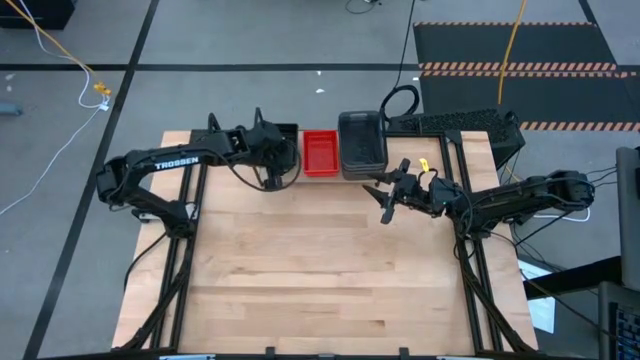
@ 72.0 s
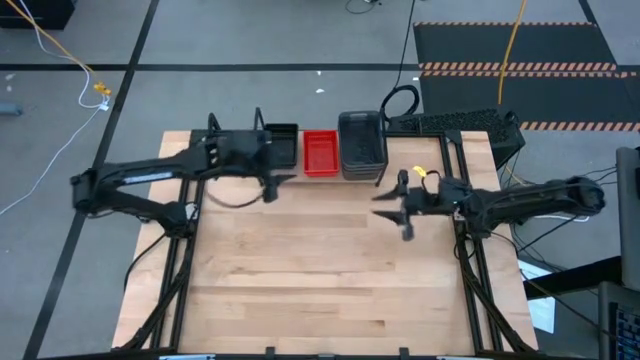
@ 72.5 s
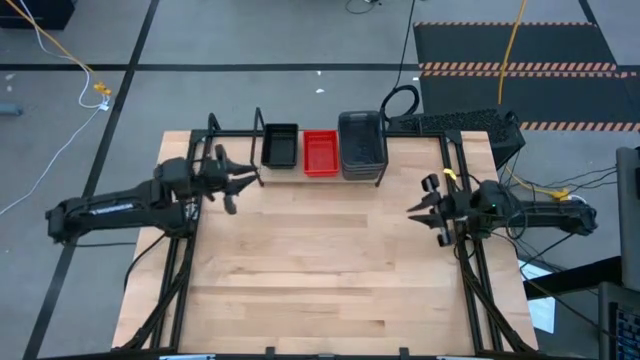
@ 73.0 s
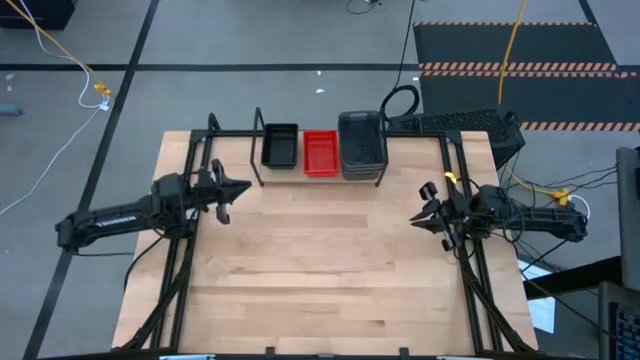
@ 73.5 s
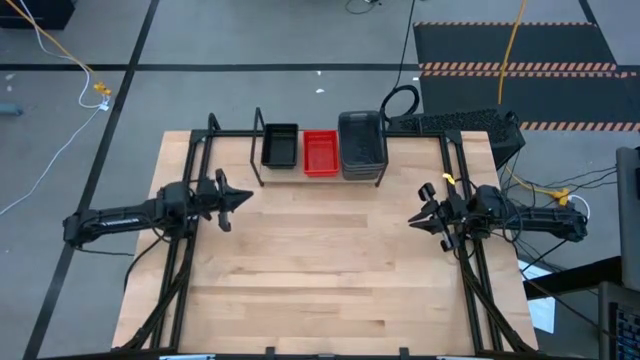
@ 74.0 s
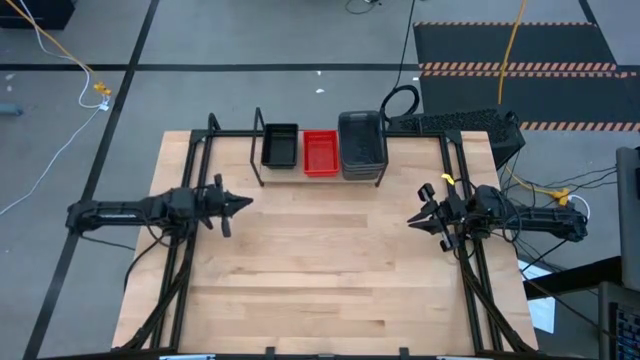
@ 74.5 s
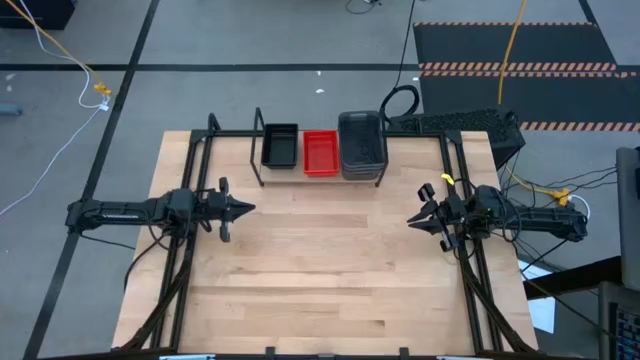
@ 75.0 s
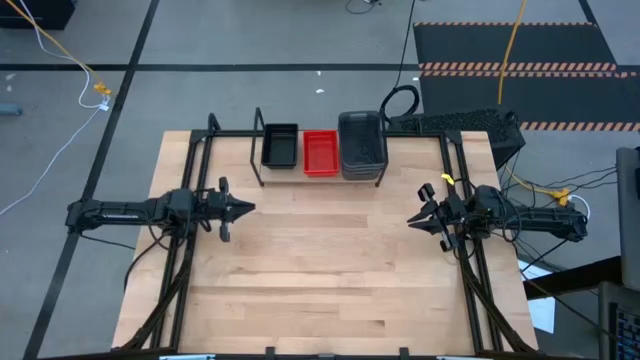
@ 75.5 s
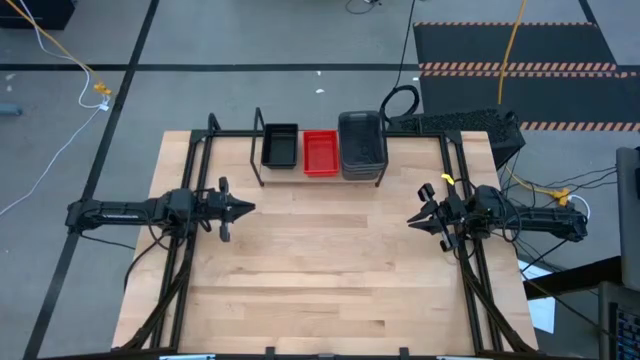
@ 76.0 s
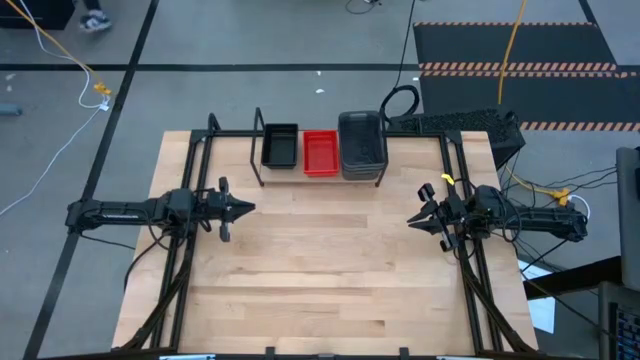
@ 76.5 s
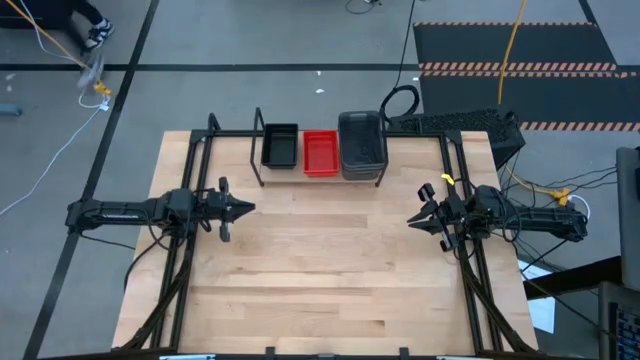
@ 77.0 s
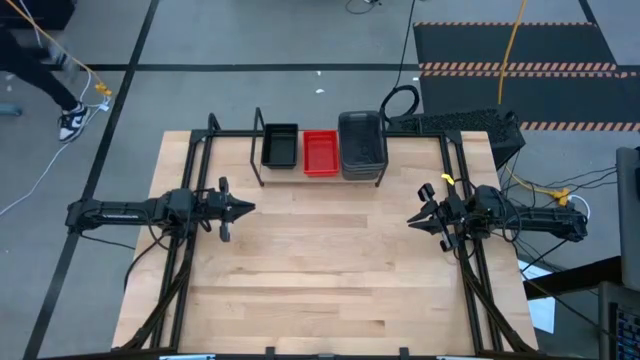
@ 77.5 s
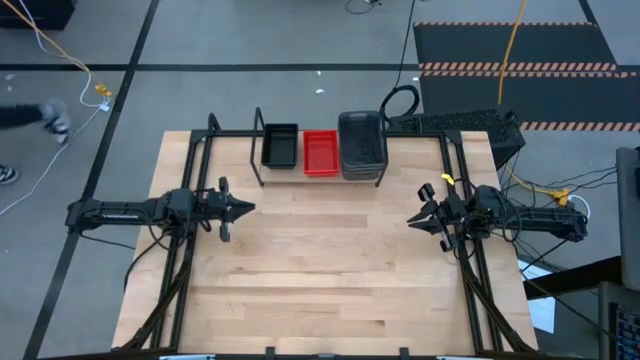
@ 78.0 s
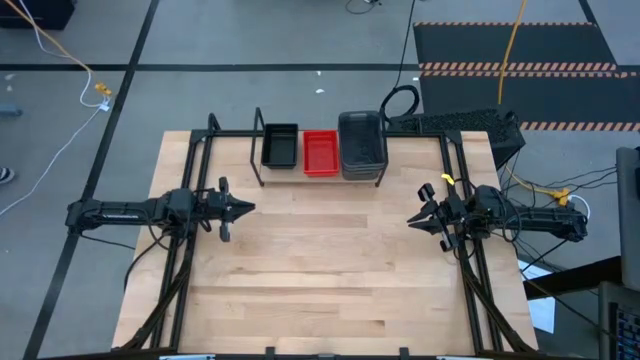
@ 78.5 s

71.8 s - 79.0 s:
Task: Stack baskets on shelf by color
Return to Home Position

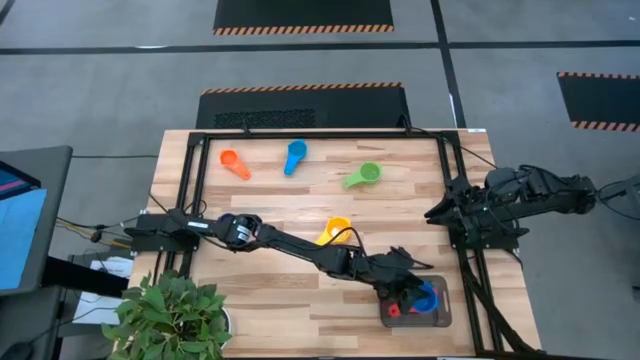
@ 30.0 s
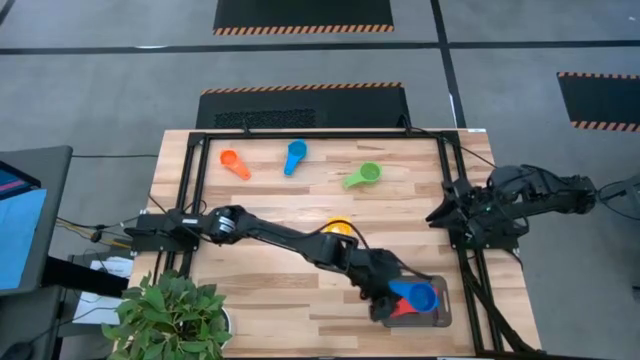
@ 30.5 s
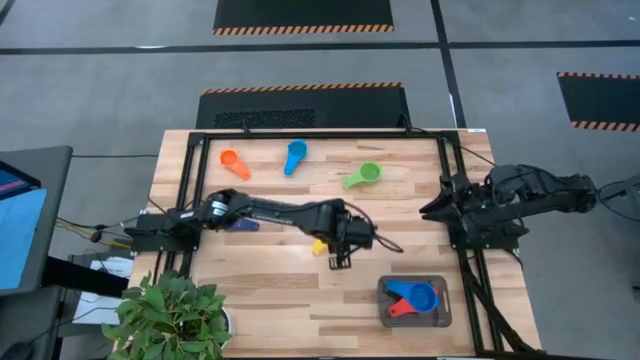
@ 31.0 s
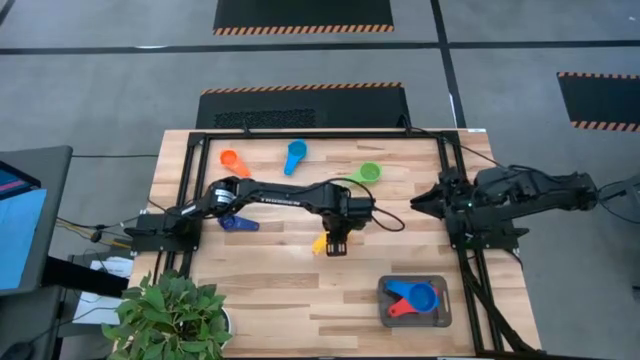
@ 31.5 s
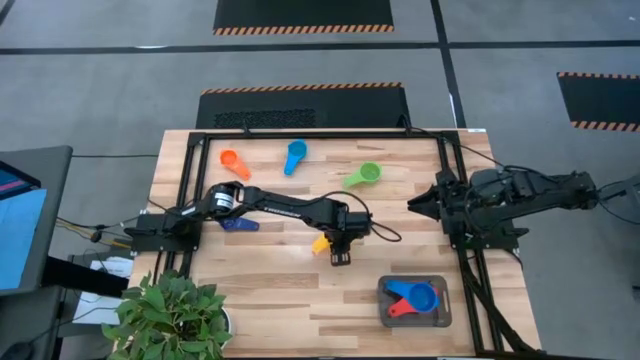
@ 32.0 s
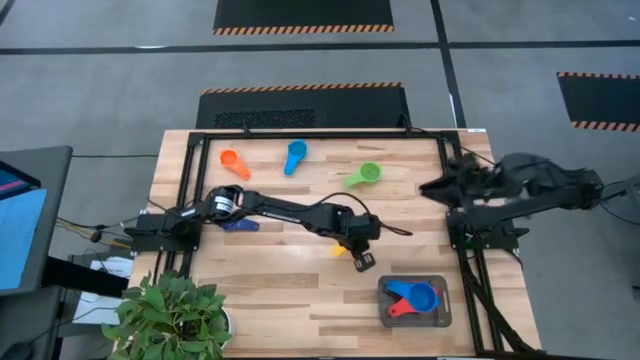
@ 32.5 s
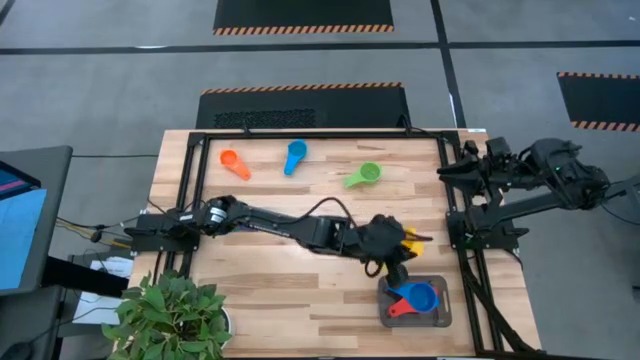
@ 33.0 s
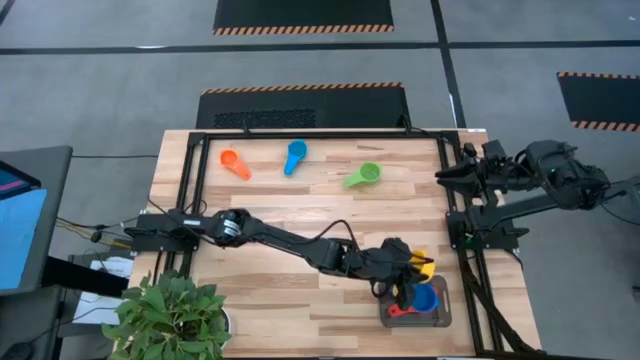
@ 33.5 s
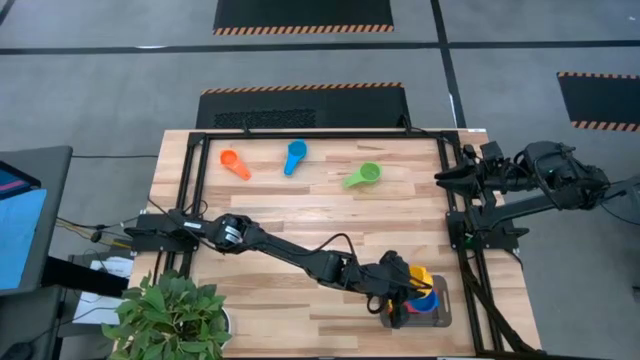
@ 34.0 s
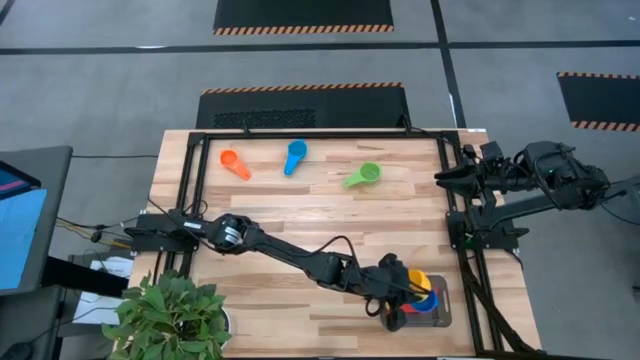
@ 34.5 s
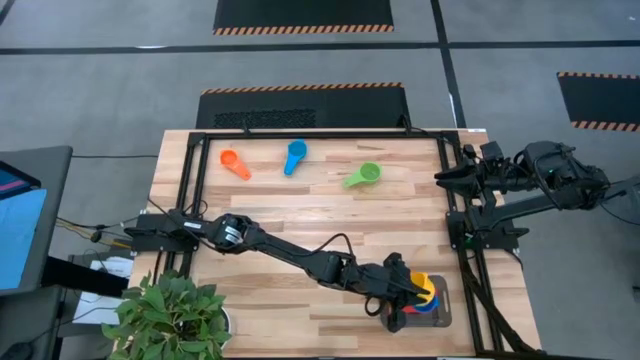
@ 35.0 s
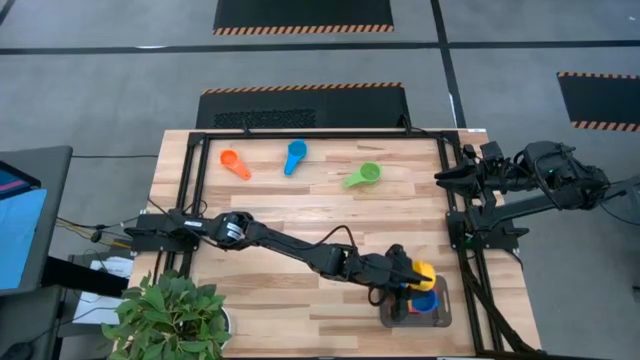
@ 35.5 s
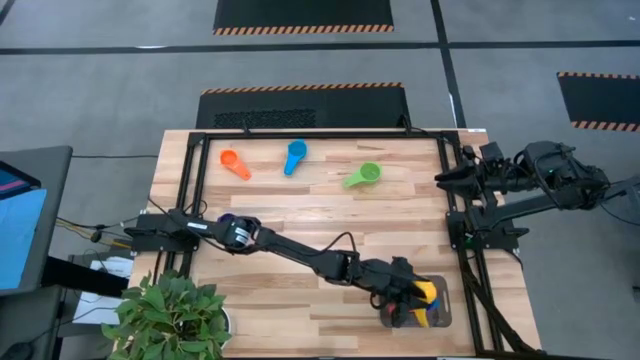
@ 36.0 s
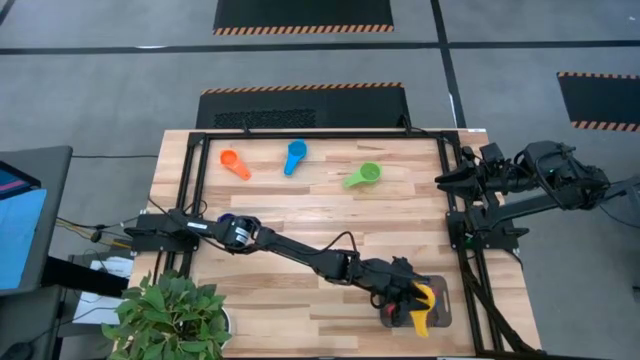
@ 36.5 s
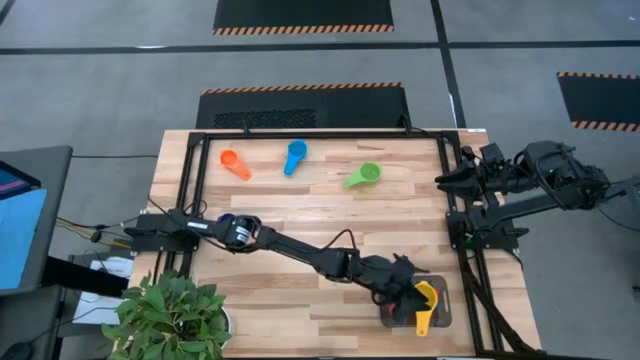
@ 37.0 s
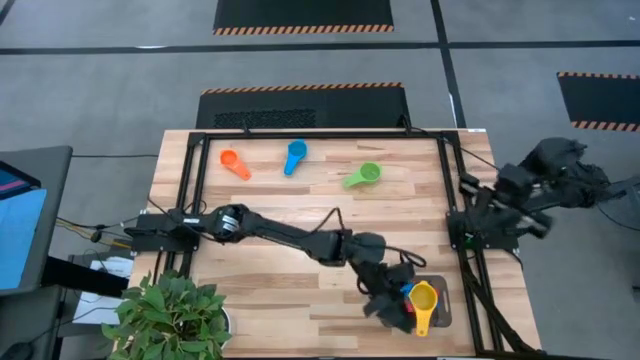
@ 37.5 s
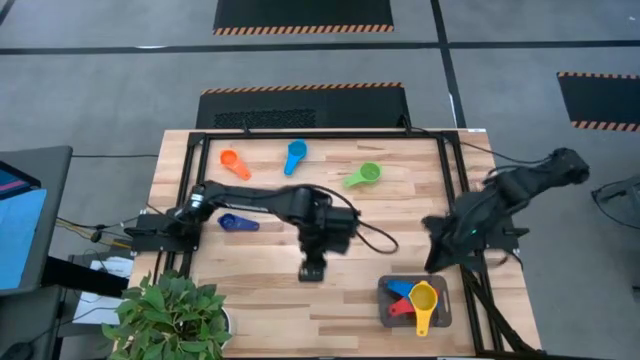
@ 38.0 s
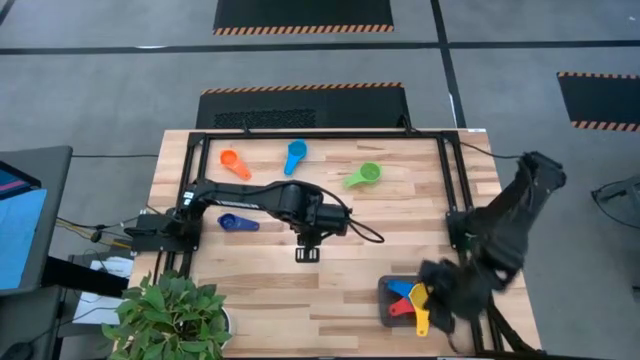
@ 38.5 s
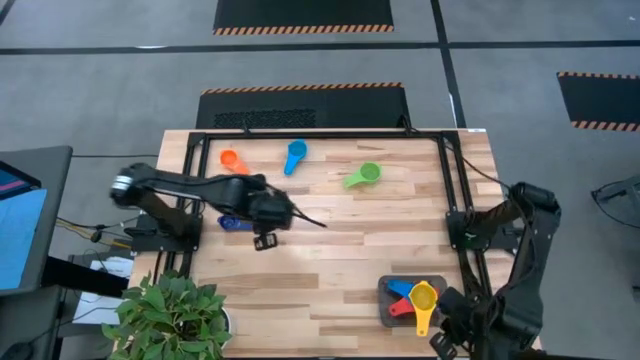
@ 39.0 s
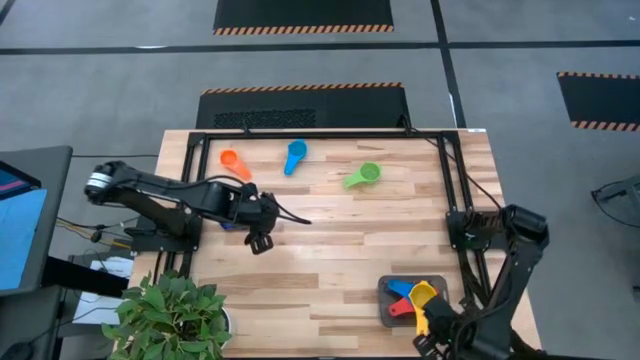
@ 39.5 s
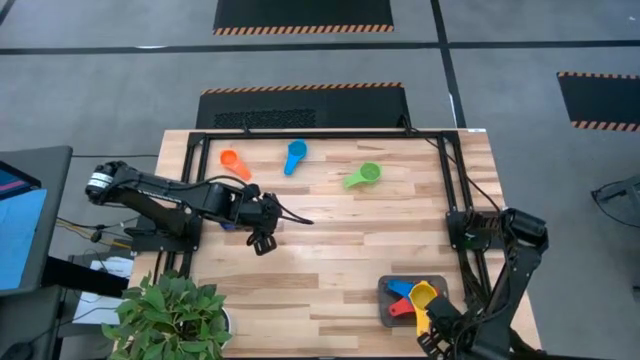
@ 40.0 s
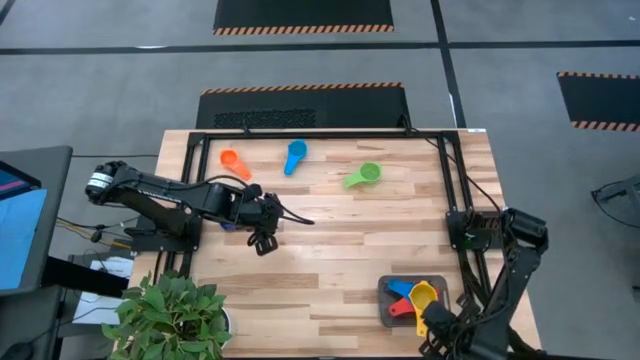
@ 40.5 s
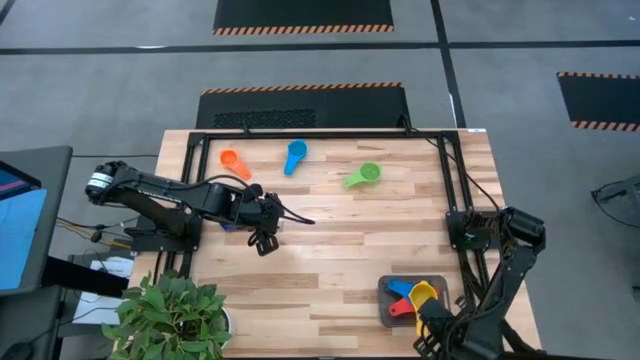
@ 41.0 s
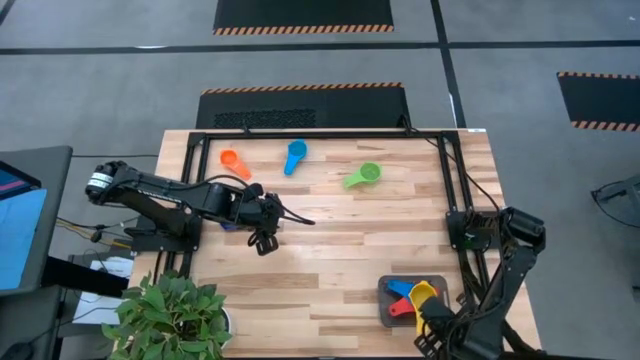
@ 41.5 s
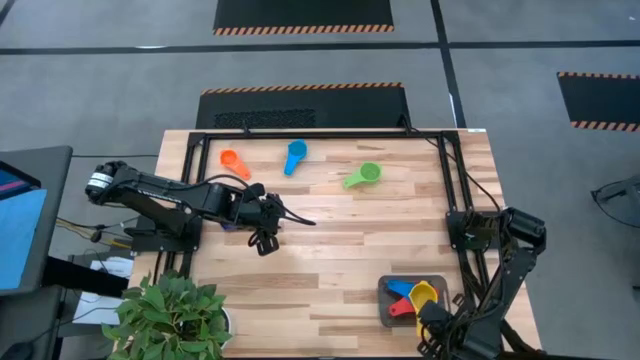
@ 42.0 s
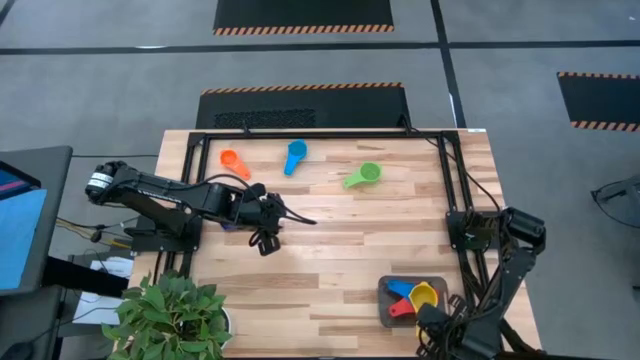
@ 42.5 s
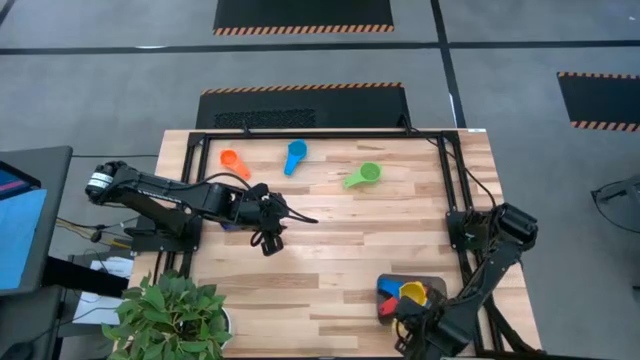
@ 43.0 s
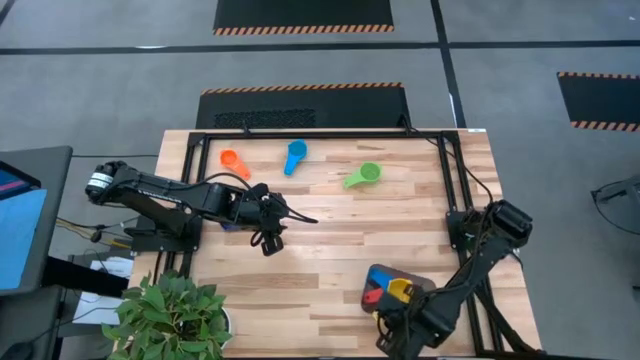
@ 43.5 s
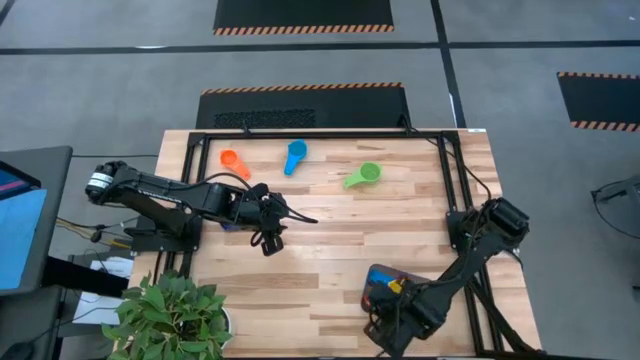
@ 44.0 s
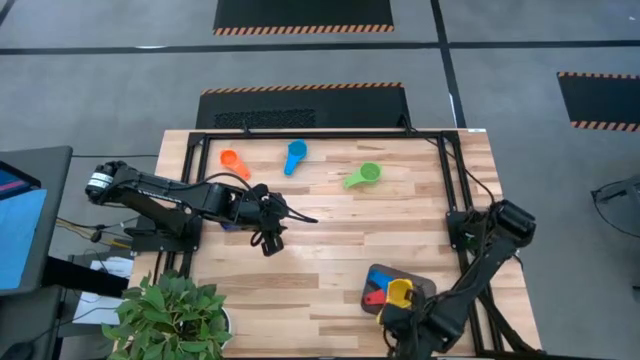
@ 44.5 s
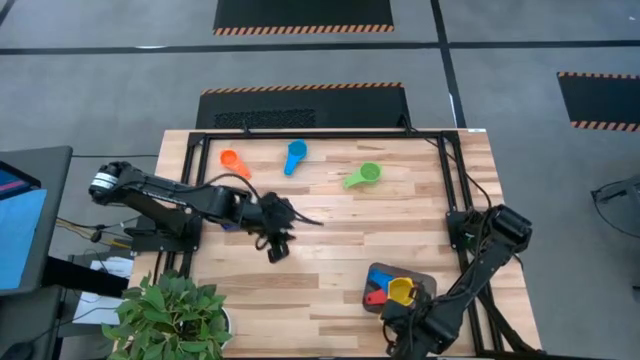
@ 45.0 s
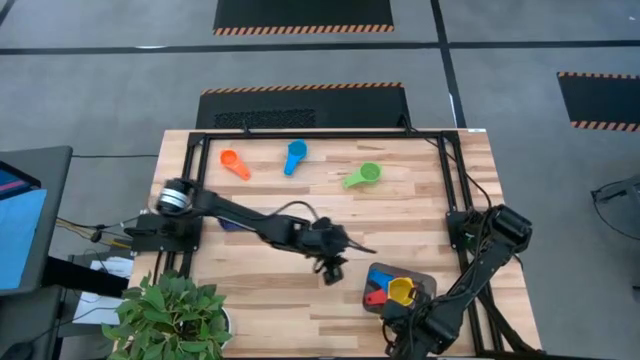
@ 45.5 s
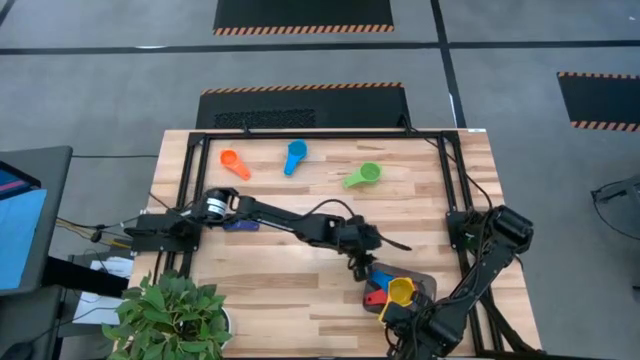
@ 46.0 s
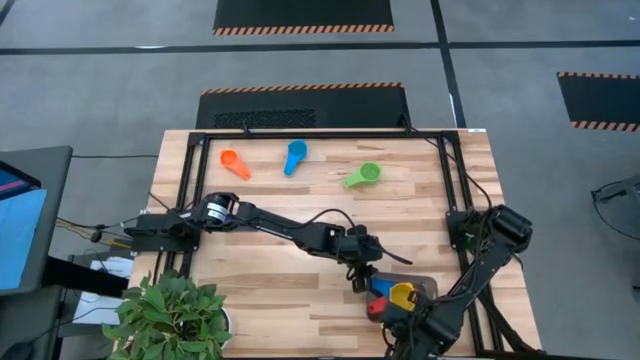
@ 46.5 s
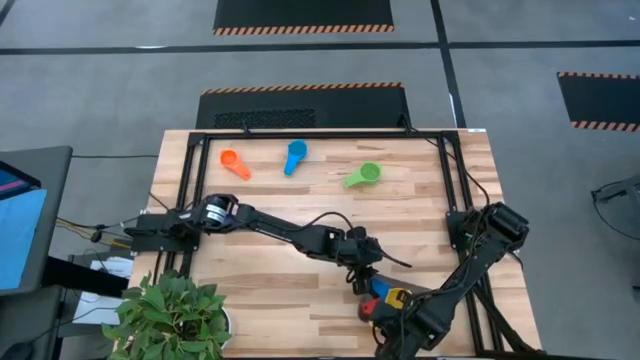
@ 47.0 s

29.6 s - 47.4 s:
Task: Nest measuring cups in basket
Stack the yellow measuring cup on top of the blue measuring cup in the black bin
